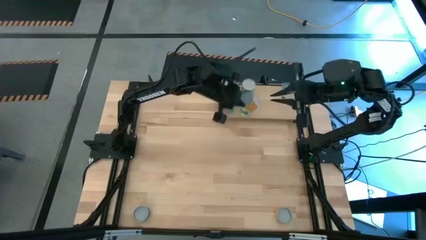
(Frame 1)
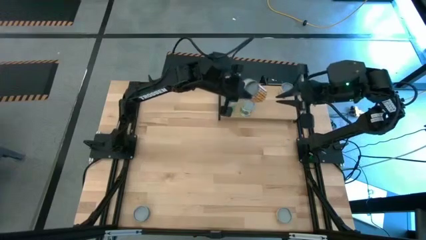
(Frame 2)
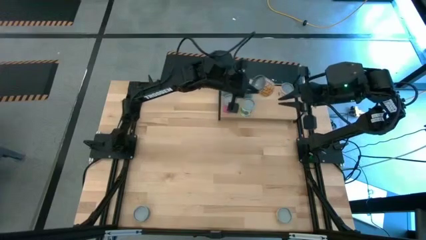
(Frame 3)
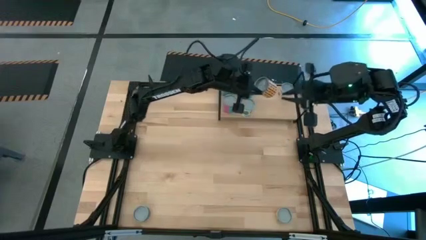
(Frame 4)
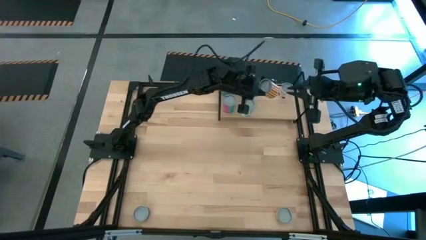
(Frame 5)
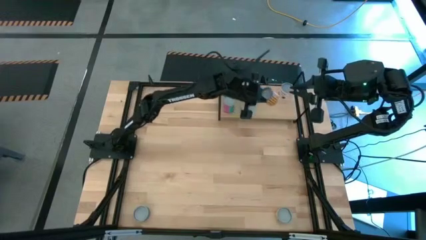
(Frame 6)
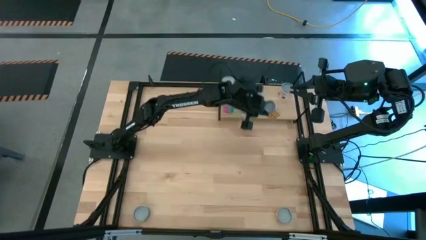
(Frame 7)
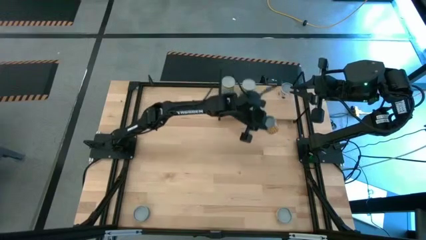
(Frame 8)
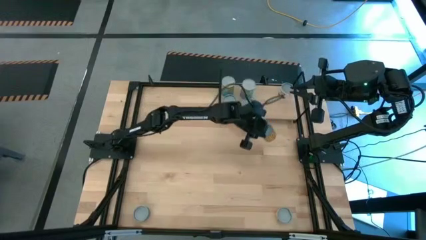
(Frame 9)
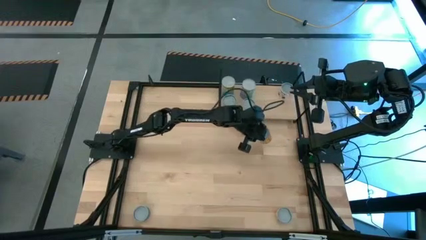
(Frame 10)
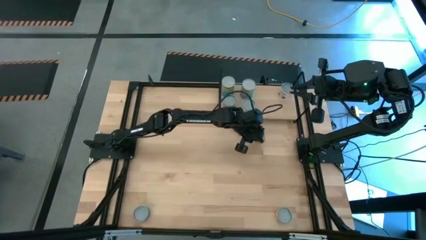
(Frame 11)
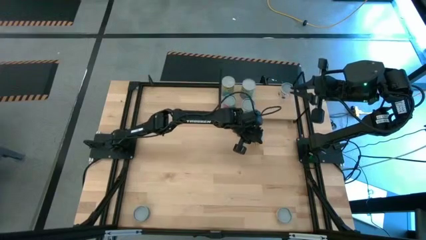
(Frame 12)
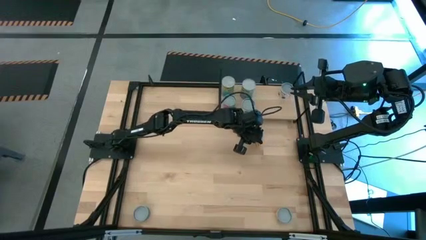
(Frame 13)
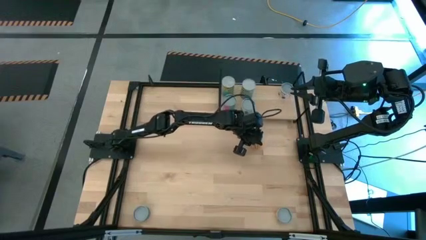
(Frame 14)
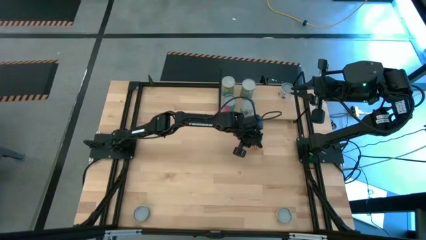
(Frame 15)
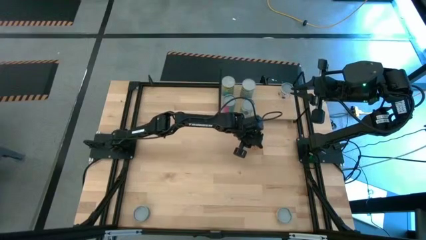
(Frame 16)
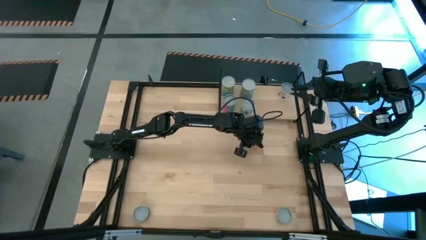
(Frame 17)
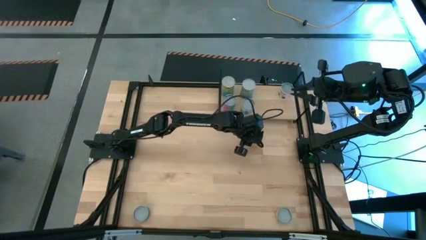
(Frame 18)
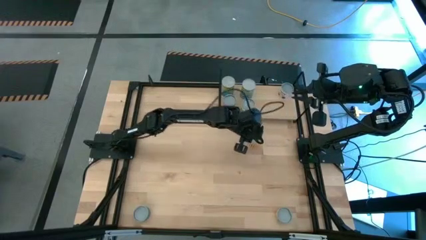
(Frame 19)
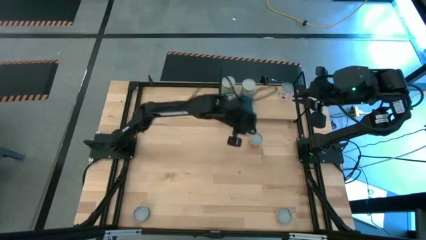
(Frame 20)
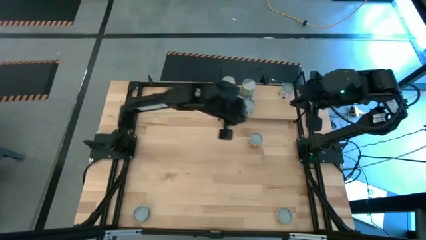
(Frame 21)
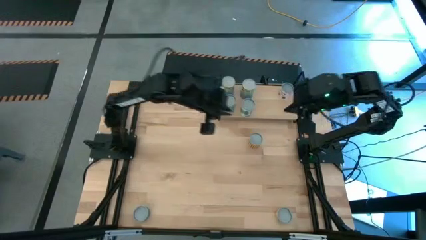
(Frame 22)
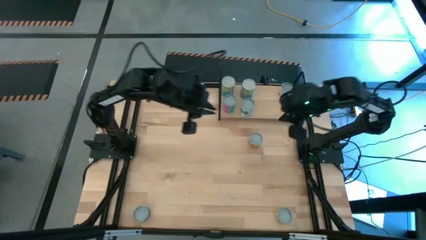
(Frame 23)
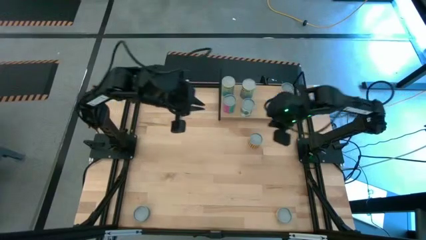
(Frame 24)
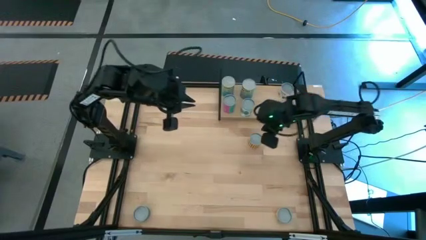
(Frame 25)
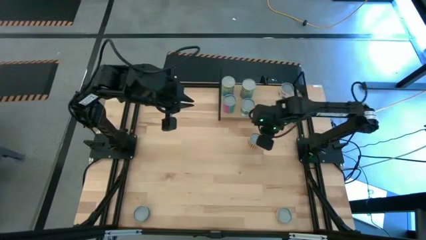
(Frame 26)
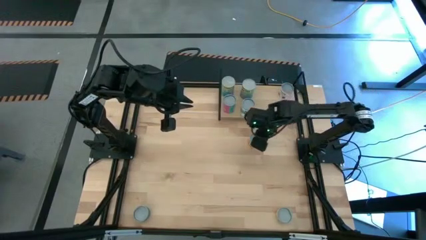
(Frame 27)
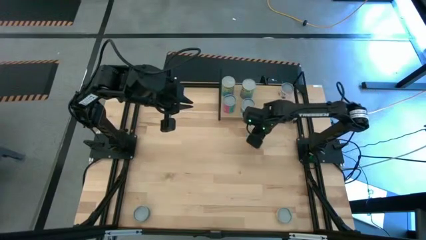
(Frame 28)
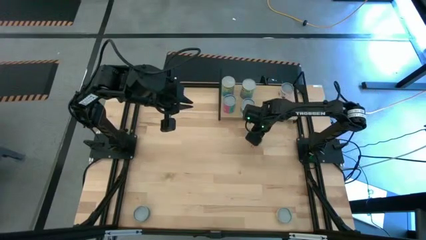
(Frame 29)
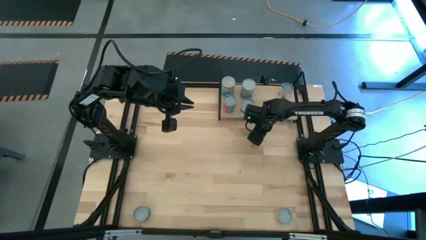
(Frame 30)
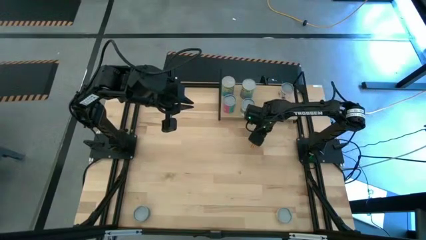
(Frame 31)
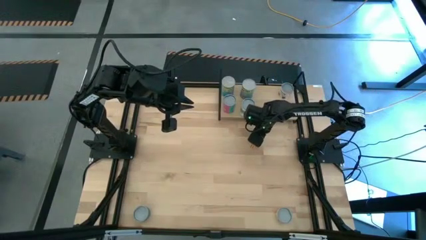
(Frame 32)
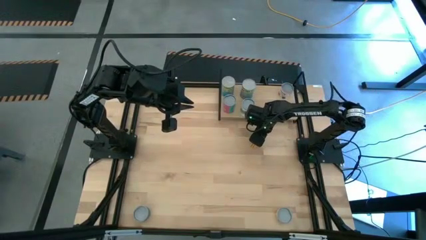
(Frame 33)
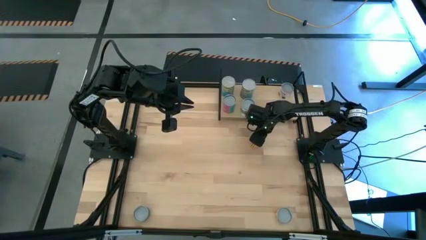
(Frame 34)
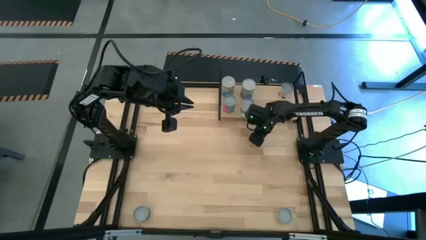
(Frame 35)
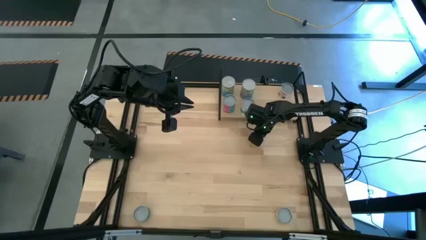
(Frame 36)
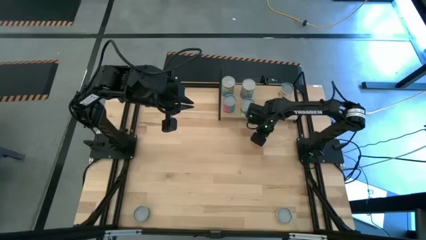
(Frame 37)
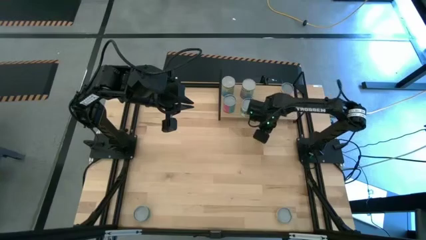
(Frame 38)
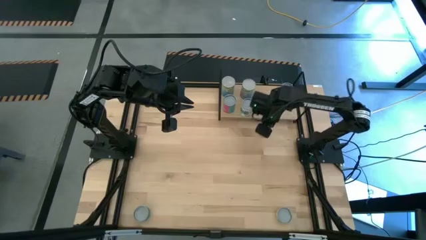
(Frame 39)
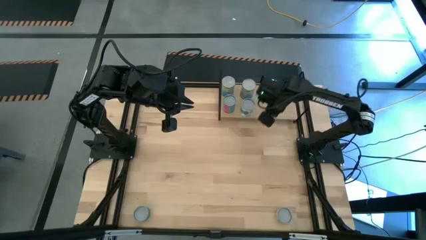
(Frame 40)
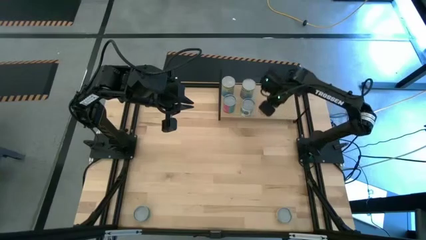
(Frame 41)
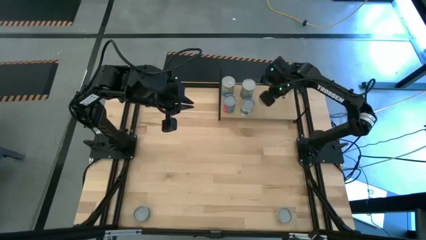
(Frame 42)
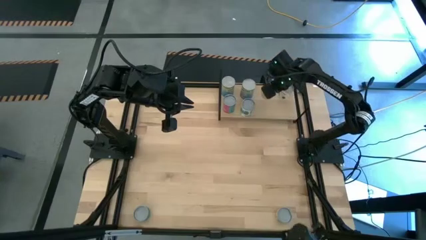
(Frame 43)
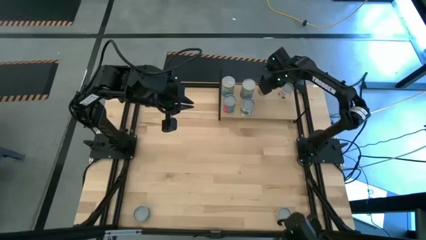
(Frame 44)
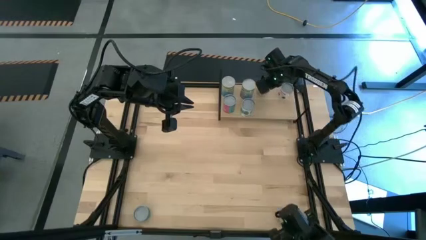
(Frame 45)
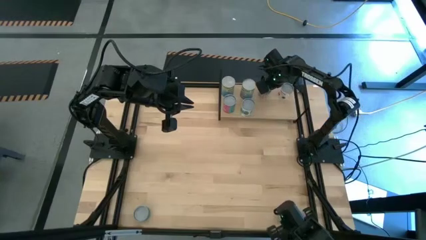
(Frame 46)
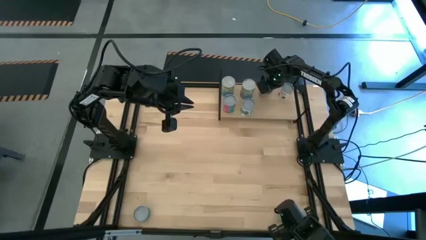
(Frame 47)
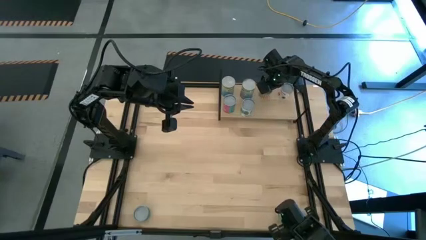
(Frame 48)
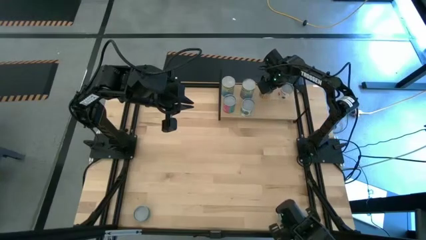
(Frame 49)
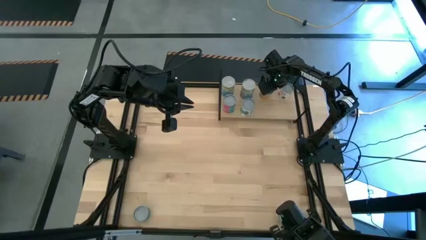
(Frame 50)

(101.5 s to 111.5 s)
Task: Pick and place cans onto a shelf
Put the canned chili beans on the shelf

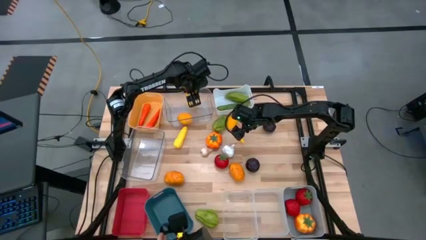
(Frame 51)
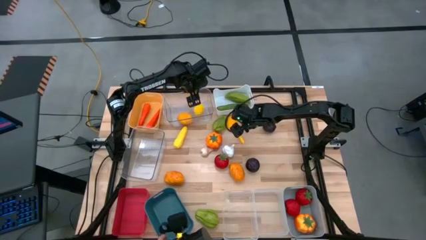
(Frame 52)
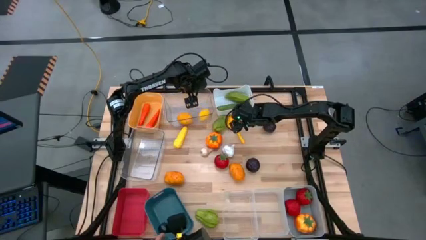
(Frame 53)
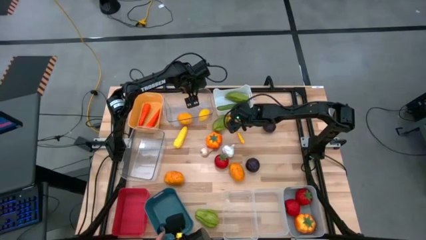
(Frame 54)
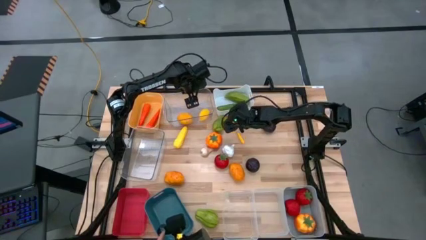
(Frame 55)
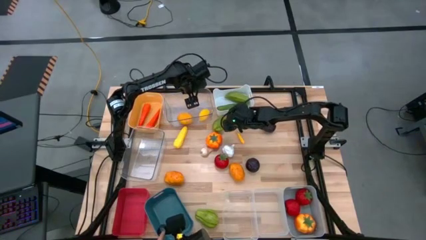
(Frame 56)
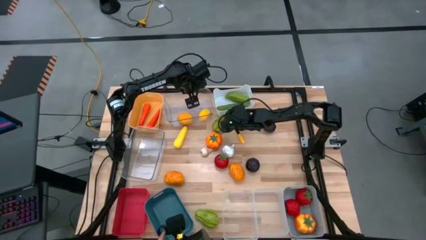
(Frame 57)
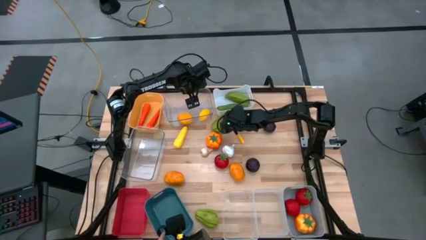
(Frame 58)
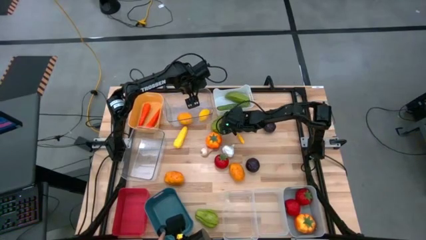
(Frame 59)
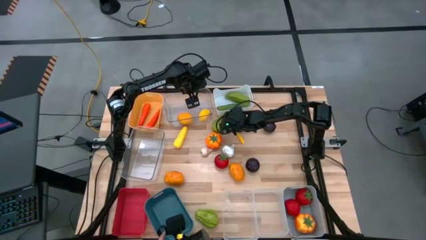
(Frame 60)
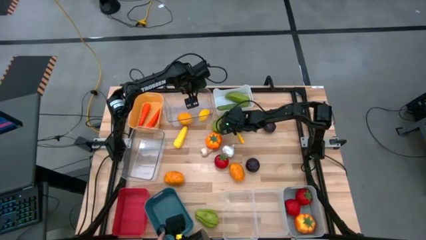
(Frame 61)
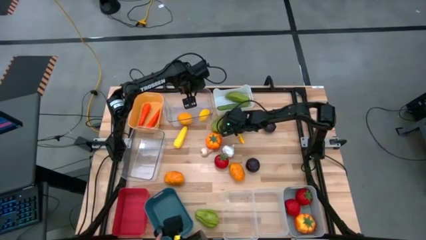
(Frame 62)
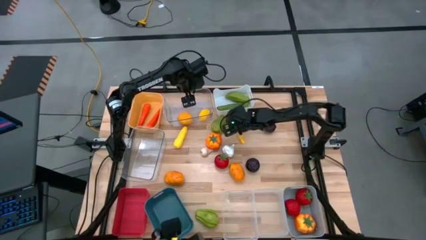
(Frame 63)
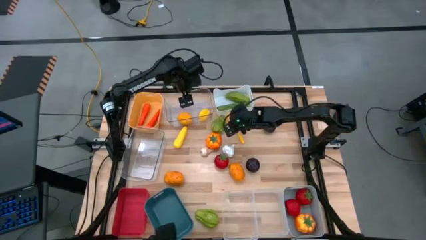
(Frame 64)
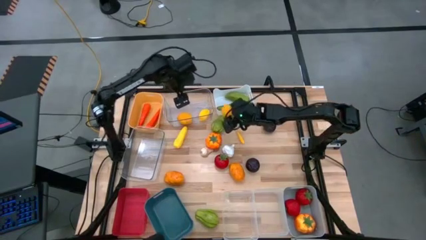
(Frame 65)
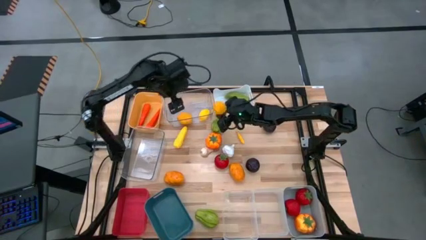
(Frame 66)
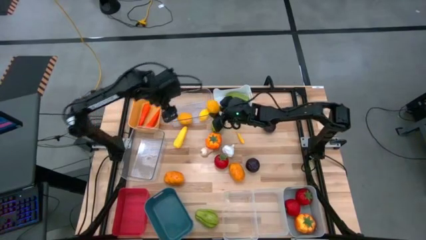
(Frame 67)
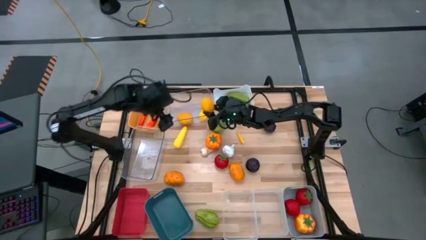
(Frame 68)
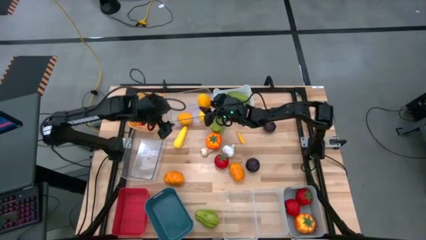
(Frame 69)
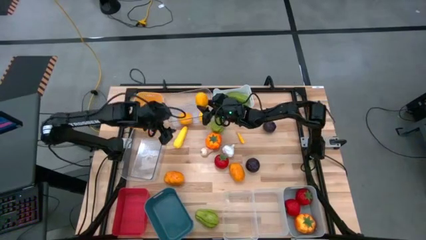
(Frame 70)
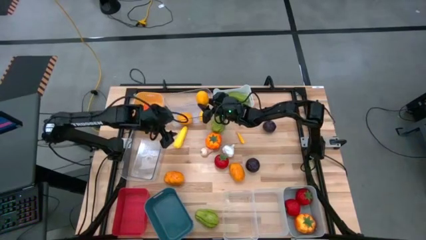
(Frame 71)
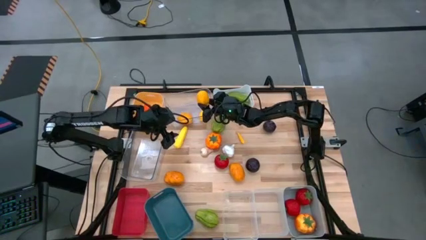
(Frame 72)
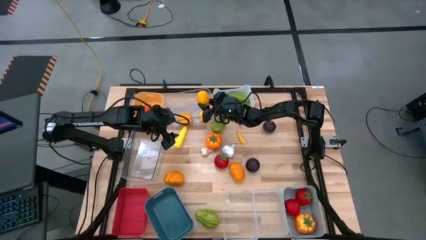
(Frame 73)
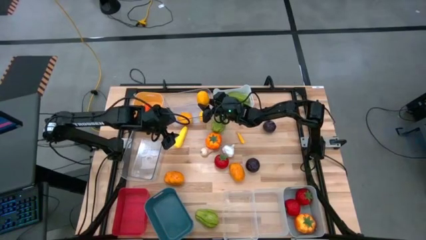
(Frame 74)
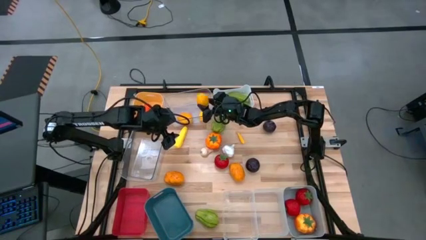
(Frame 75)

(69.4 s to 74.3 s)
Task: Sort produce into baskets
Put the yellow lemon into the top transparent bin
